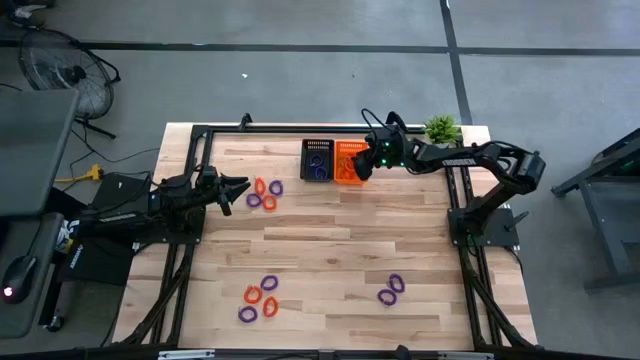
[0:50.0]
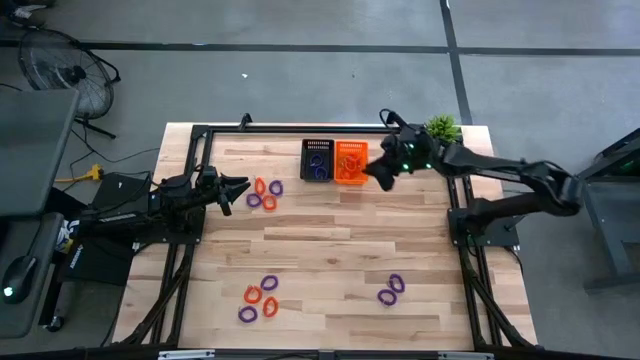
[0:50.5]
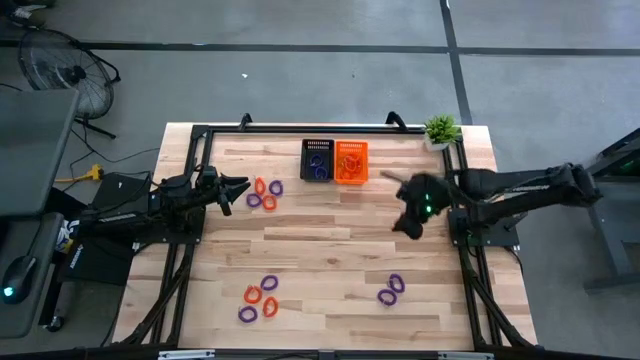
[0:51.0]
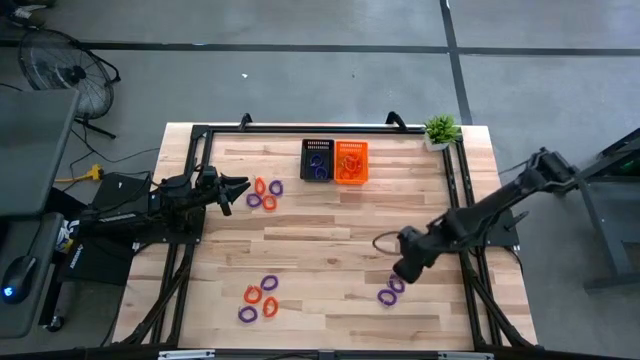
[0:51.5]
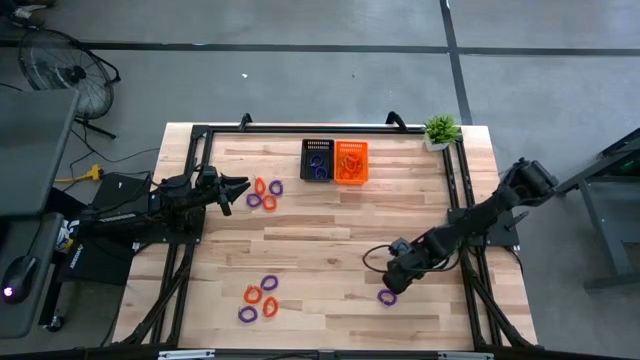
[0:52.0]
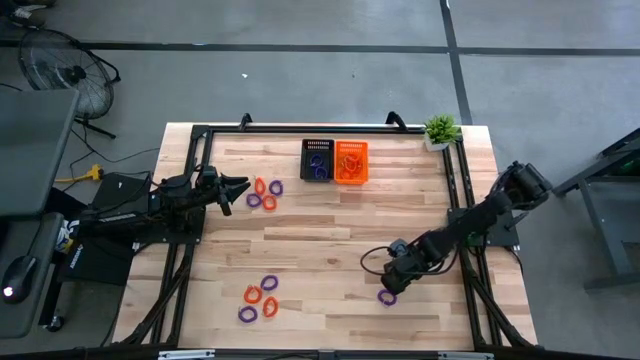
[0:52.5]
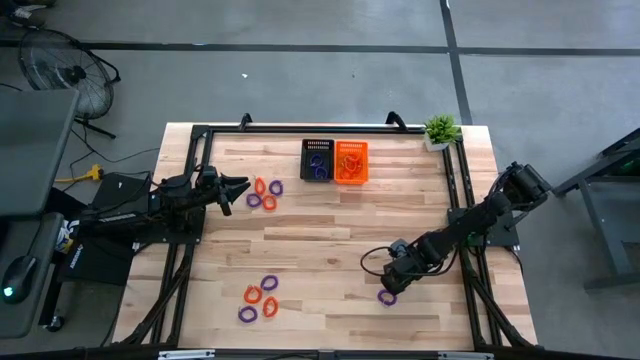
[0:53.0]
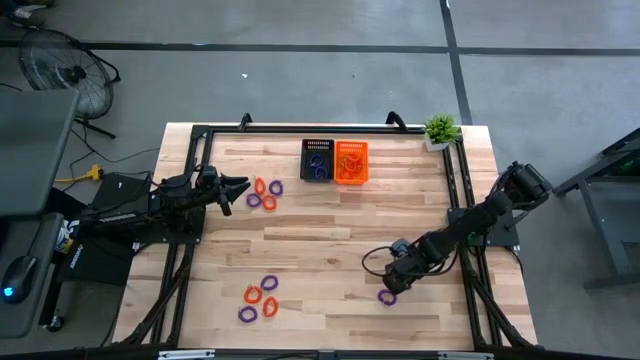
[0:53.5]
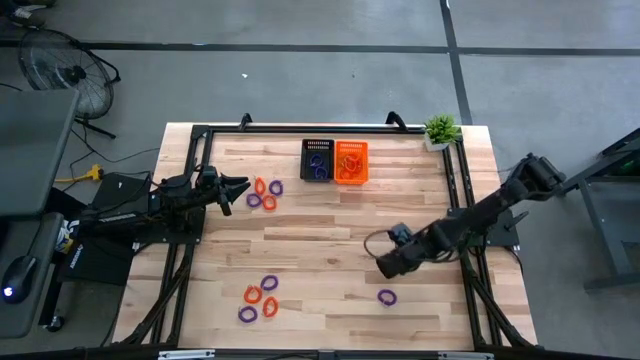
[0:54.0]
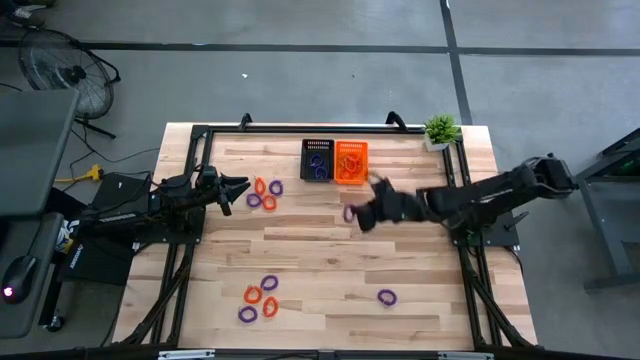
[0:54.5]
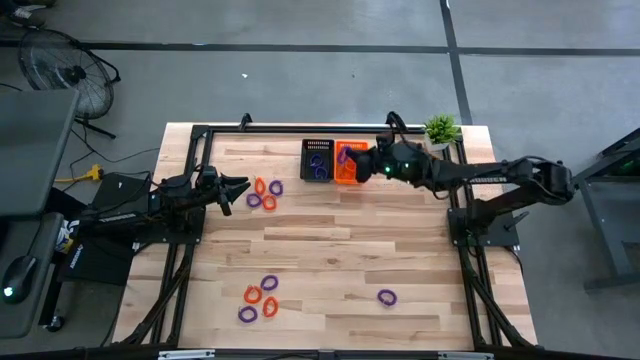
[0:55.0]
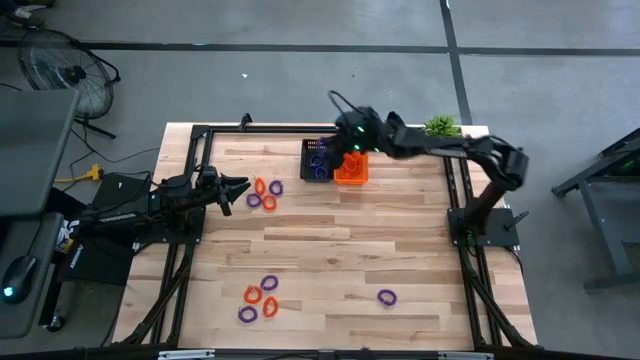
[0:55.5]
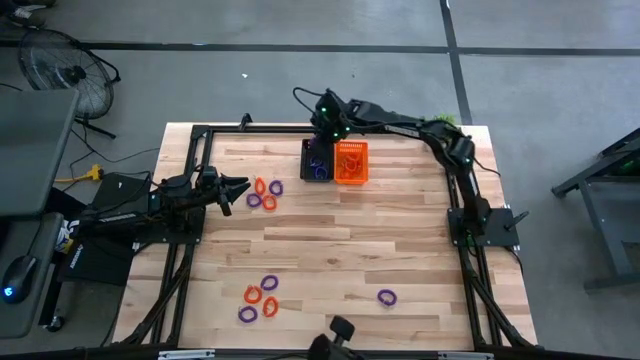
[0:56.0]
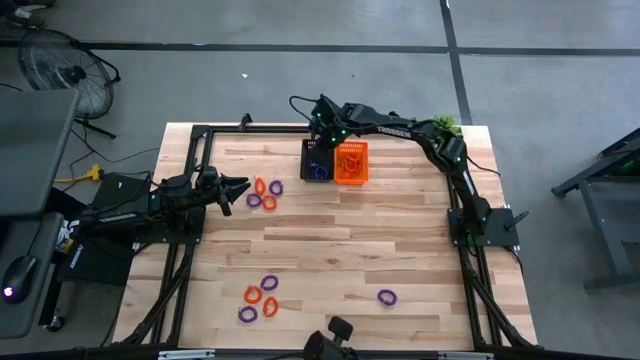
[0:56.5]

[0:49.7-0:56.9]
Task: Sort spring keychains
Put the purple spring keychain in the black bin

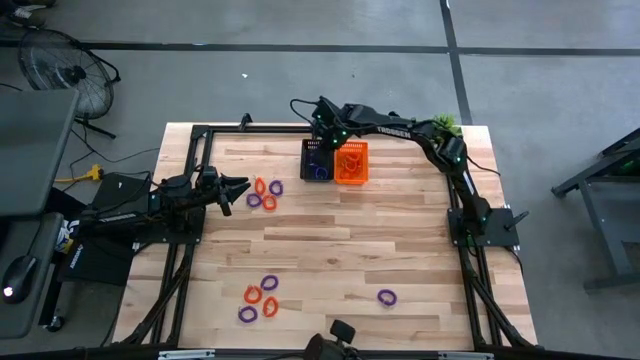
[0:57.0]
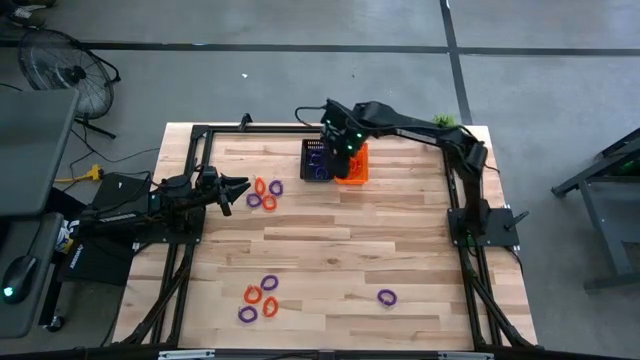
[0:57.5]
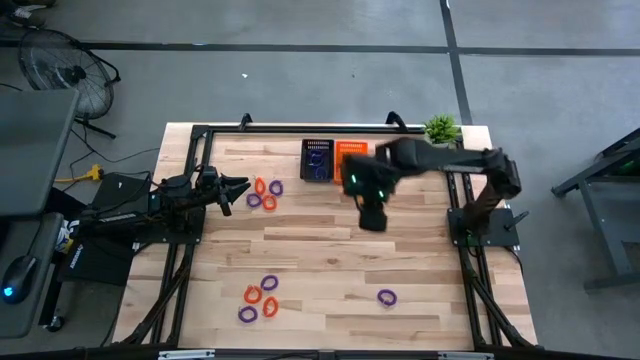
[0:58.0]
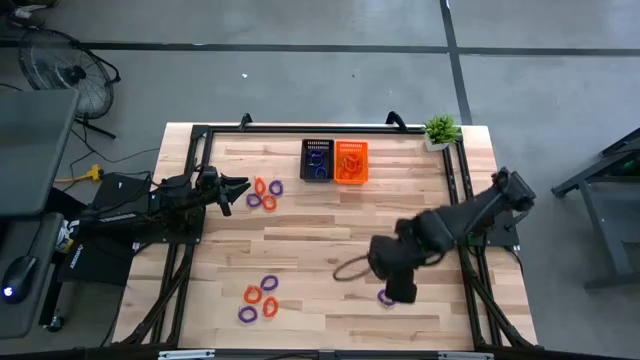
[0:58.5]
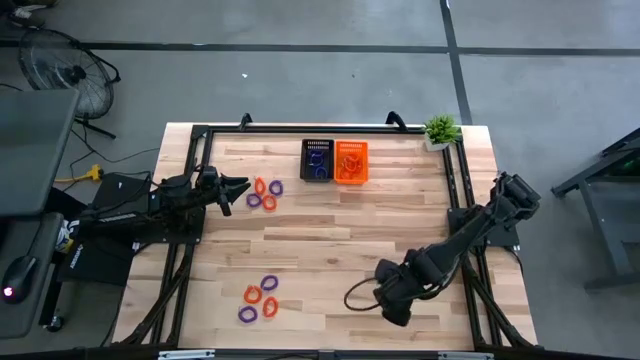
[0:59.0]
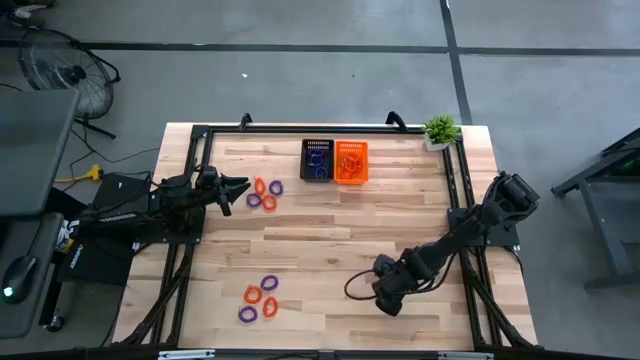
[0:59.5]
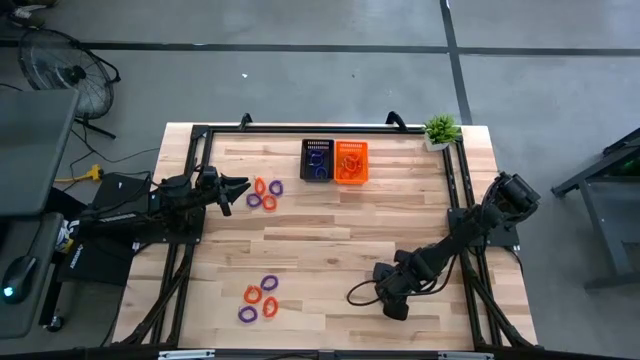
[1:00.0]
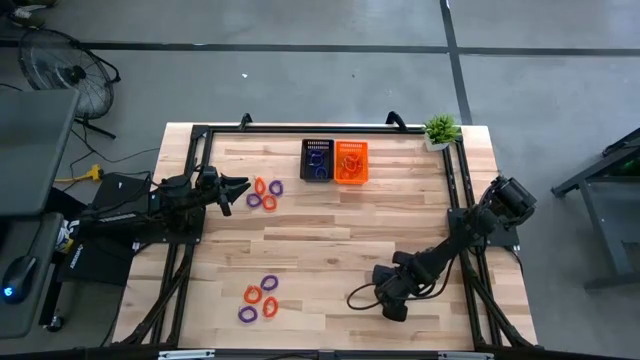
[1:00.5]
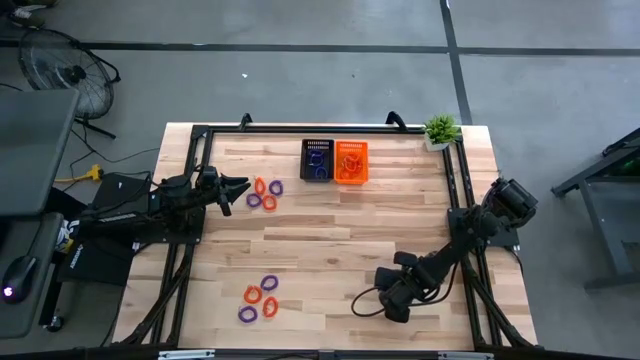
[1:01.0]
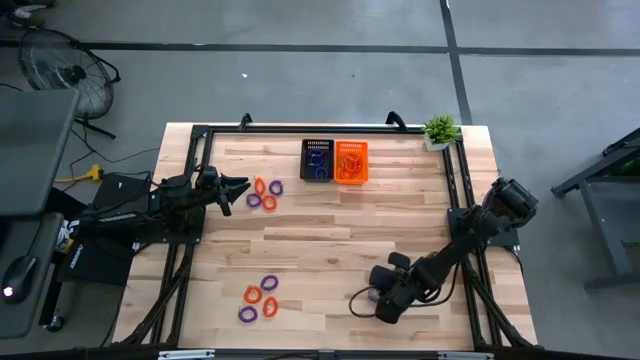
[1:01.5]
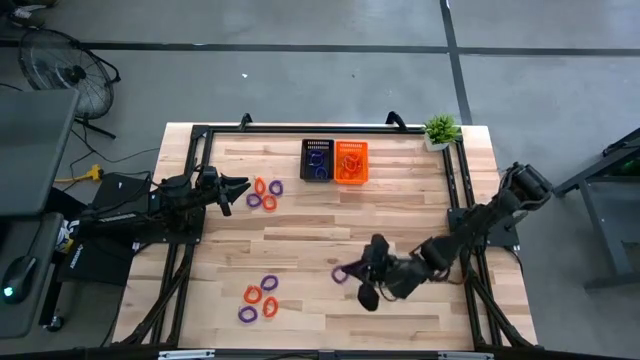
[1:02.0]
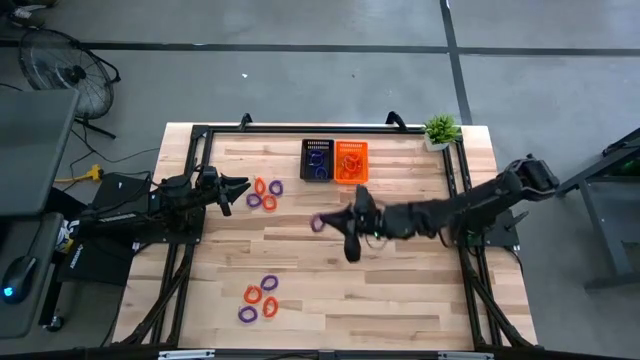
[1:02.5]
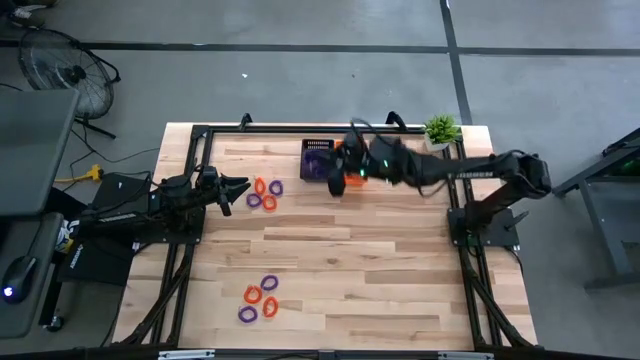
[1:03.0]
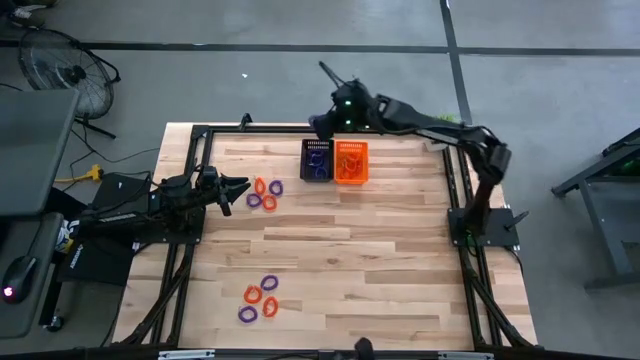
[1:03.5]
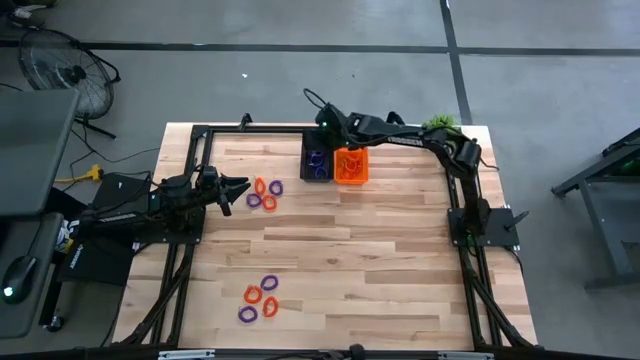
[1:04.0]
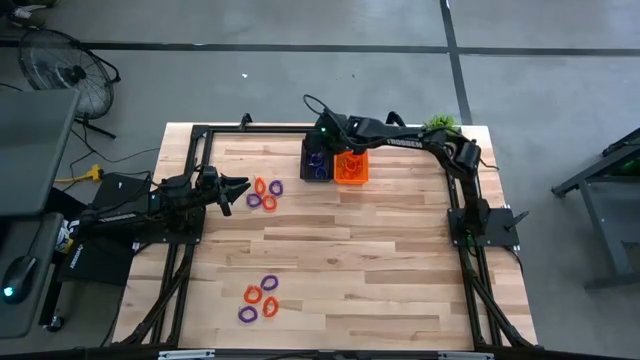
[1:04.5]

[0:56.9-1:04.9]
Put the purple spring keychain in the black bin

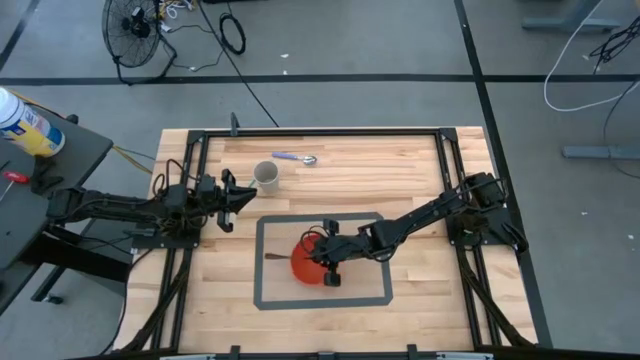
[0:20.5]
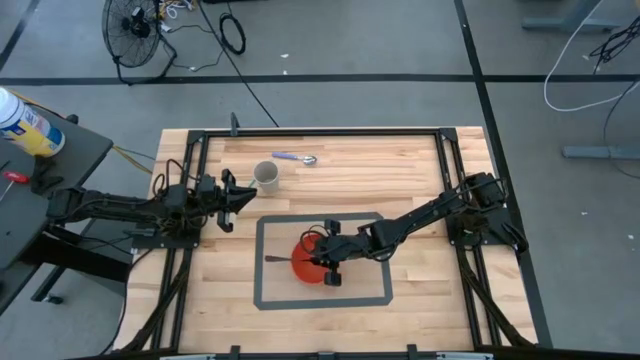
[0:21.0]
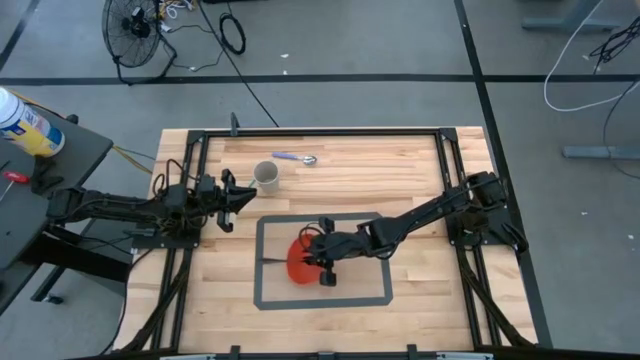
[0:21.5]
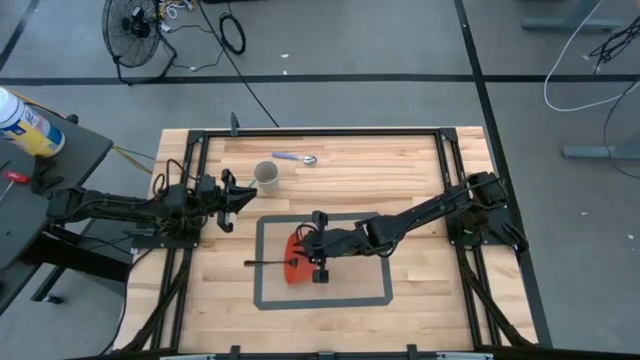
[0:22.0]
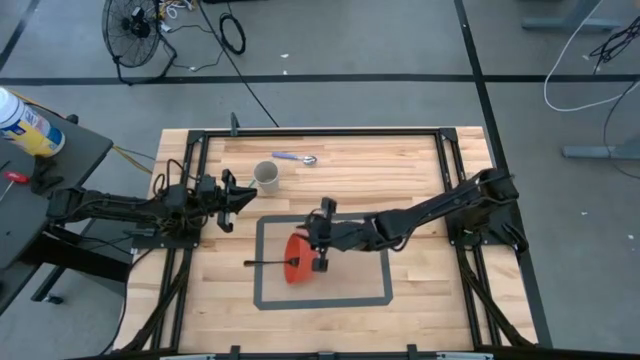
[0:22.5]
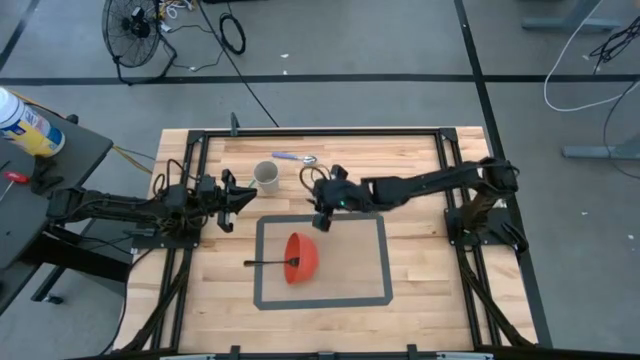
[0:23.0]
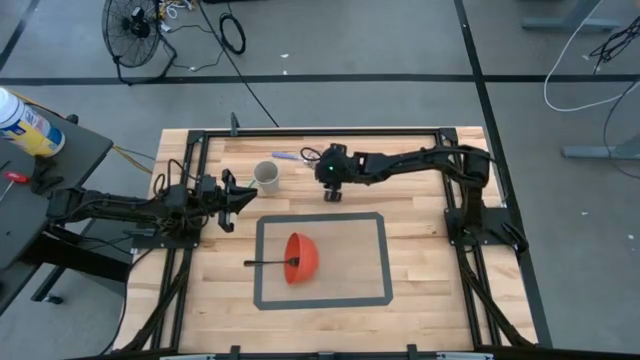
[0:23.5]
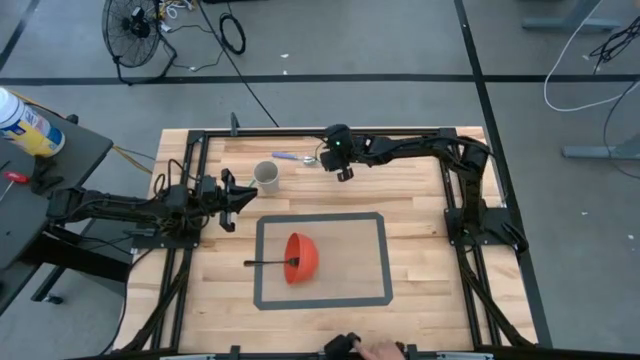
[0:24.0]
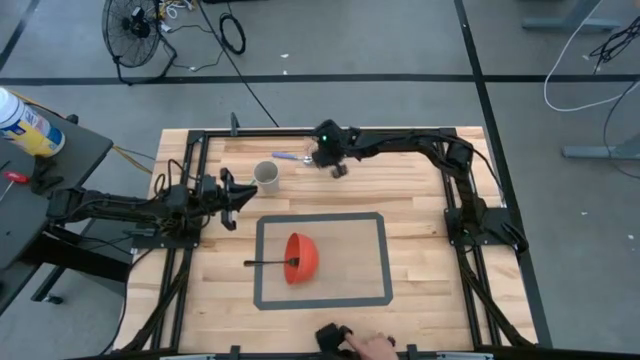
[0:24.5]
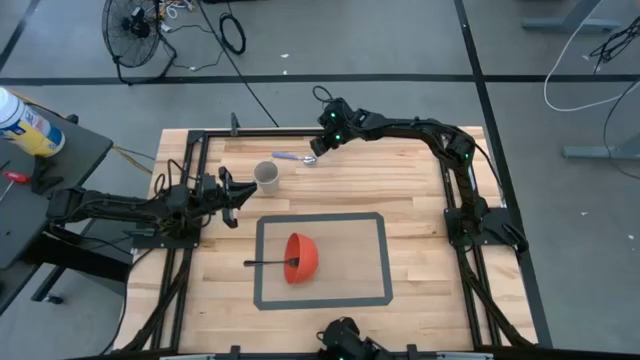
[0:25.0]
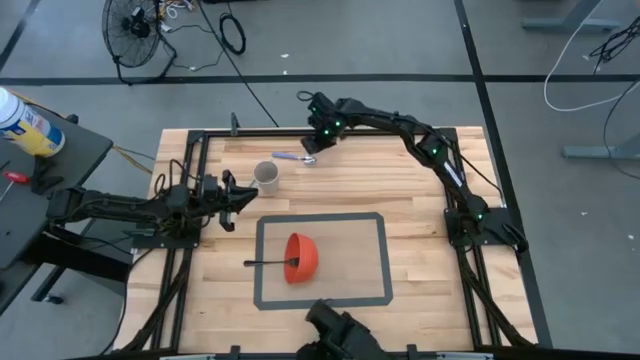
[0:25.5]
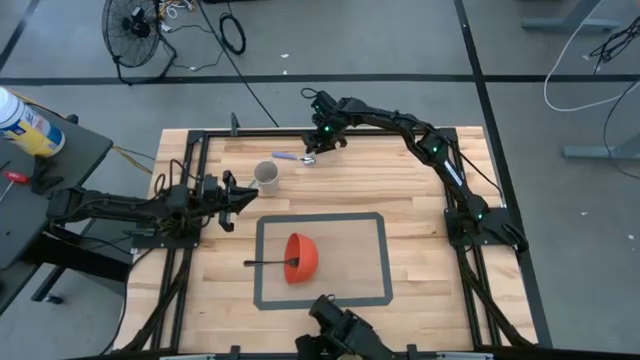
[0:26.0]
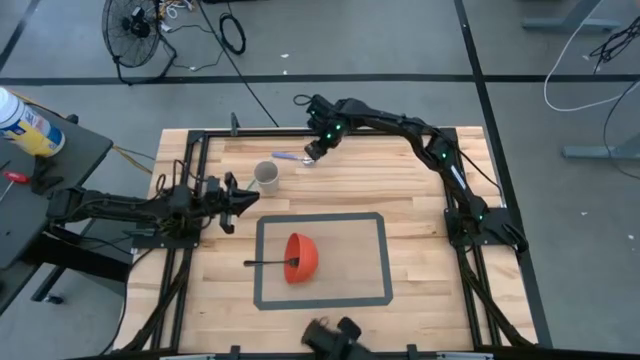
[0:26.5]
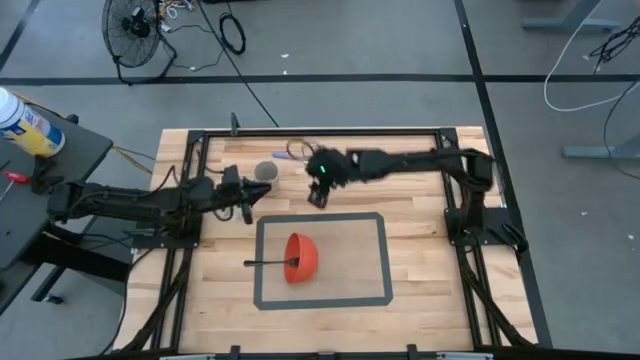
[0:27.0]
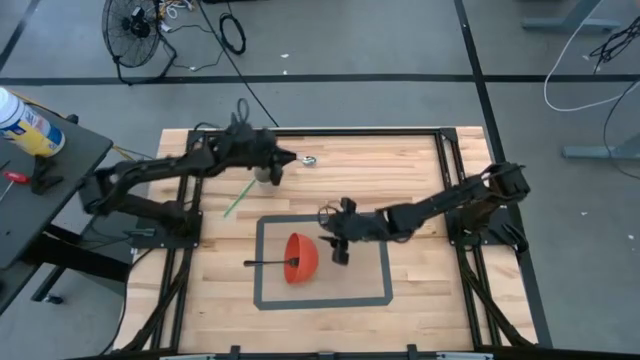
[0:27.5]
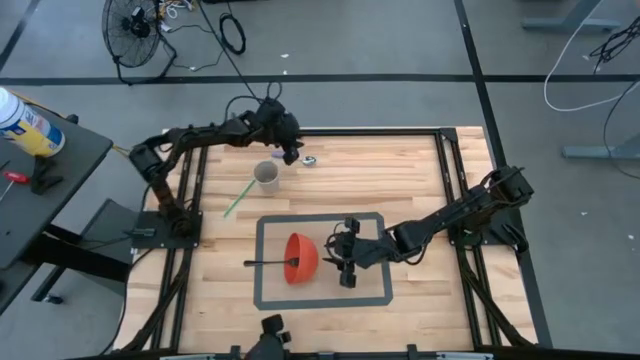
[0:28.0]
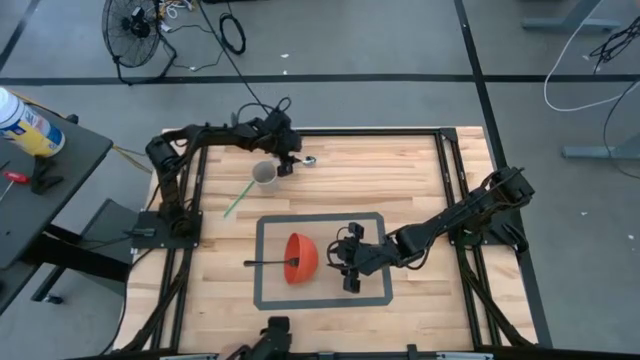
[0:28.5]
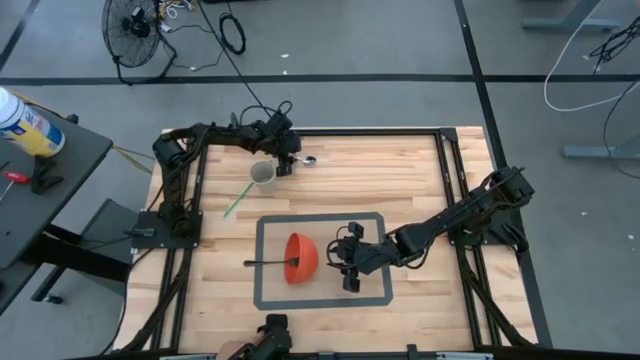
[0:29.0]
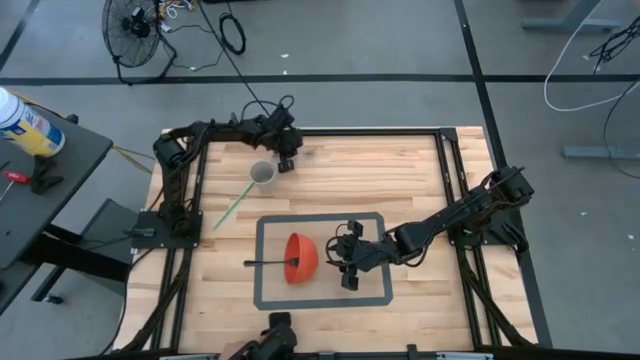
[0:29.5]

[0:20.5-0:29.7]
Task: Pick & Place Utensil
Put the purple spoon into the orange bowl on the brown table mat
